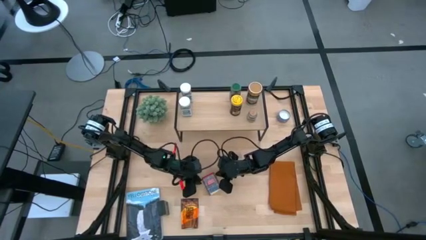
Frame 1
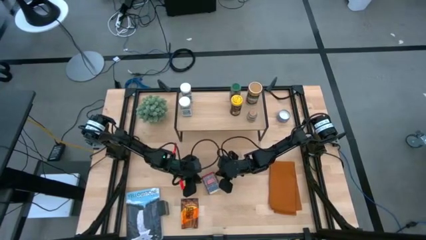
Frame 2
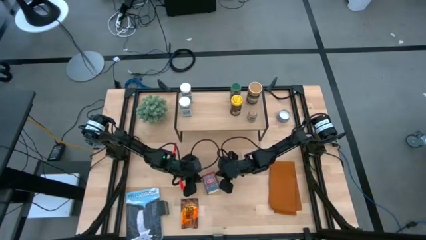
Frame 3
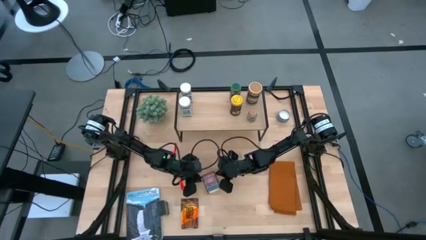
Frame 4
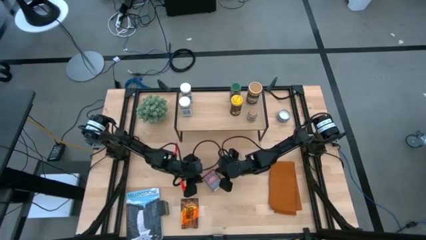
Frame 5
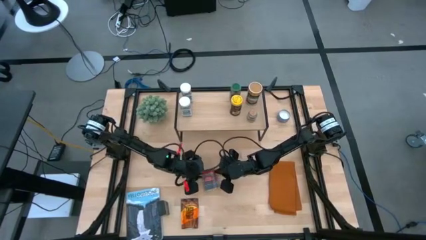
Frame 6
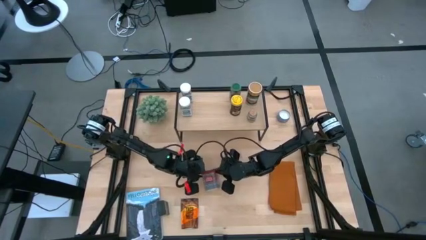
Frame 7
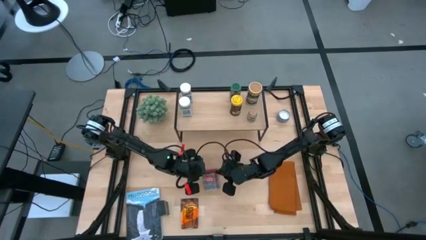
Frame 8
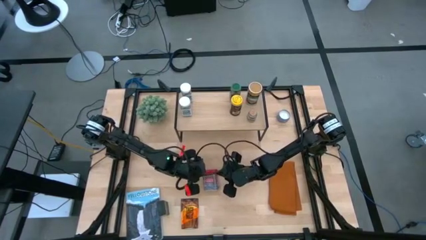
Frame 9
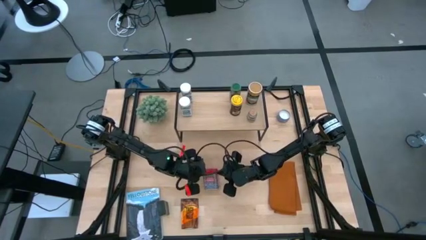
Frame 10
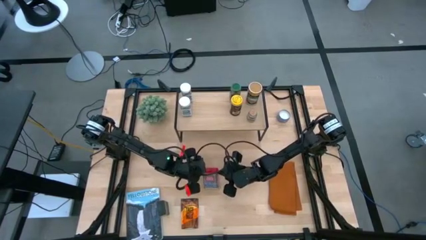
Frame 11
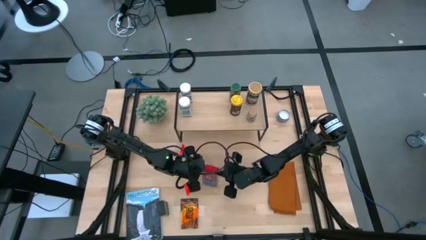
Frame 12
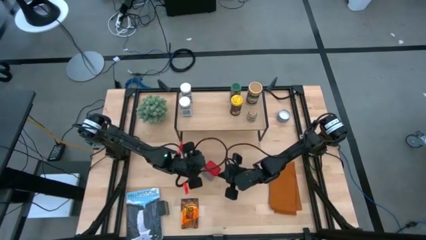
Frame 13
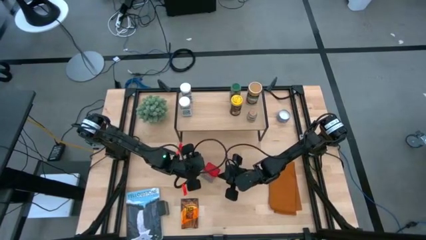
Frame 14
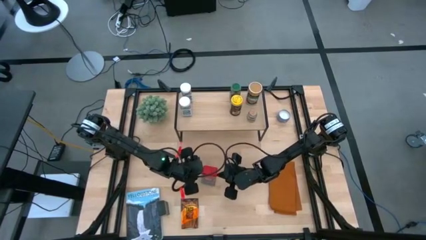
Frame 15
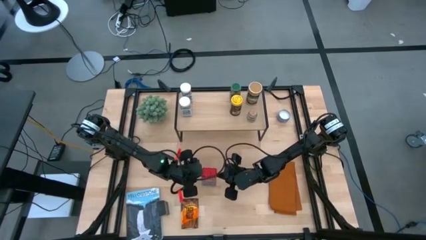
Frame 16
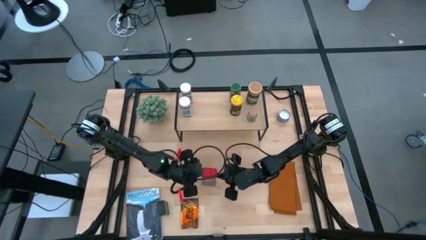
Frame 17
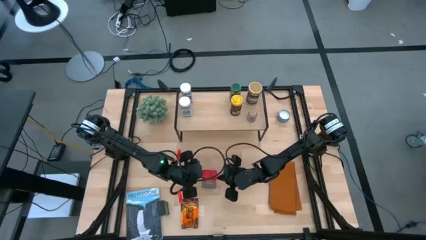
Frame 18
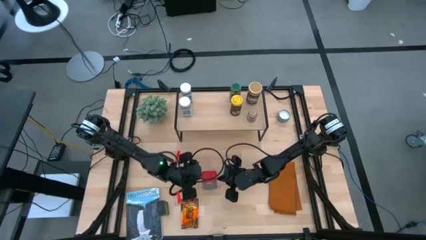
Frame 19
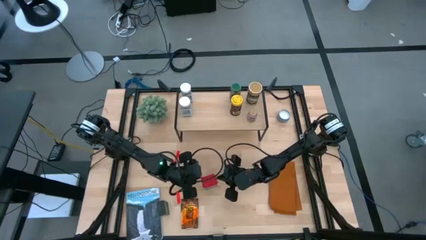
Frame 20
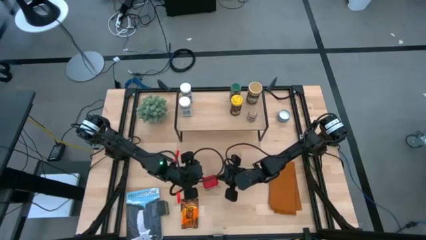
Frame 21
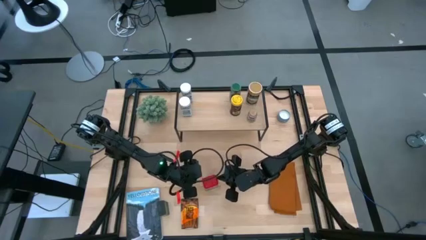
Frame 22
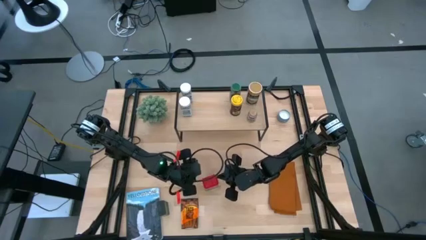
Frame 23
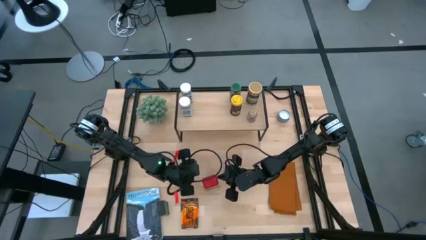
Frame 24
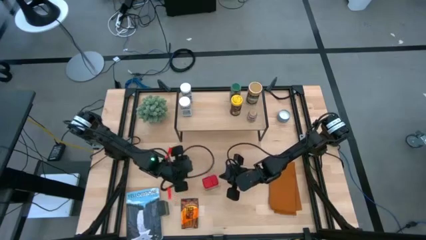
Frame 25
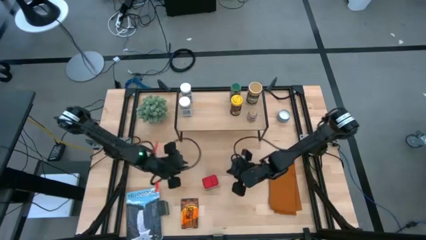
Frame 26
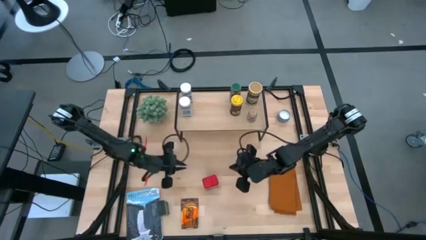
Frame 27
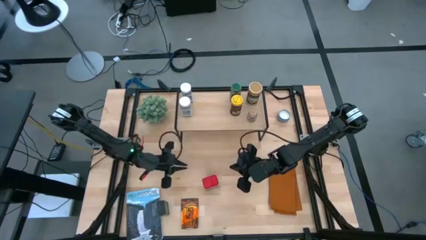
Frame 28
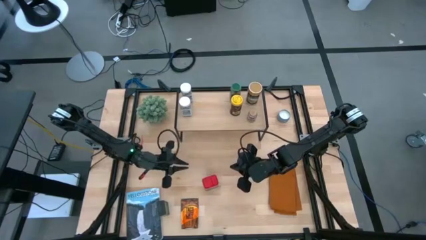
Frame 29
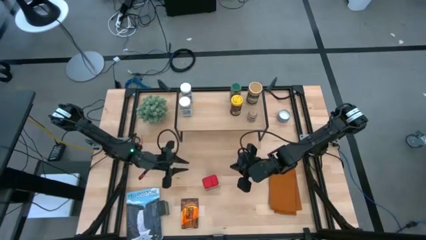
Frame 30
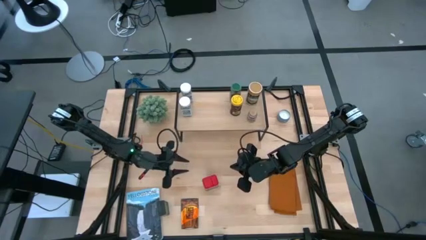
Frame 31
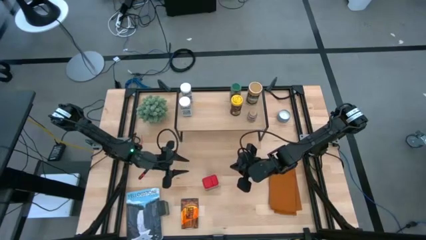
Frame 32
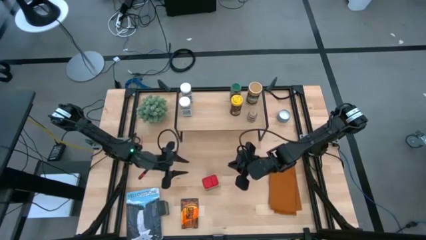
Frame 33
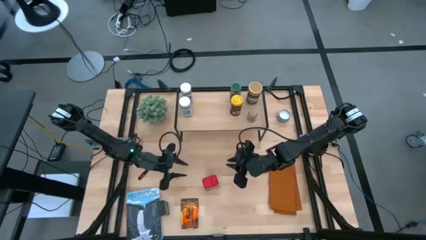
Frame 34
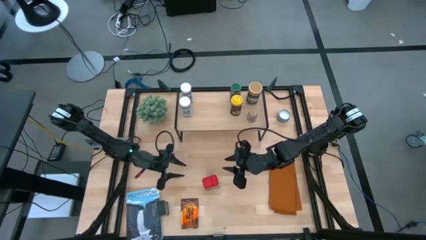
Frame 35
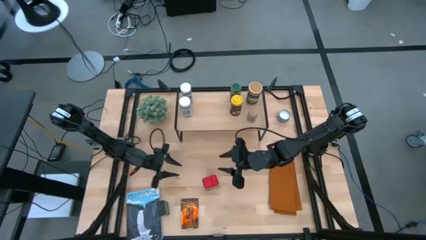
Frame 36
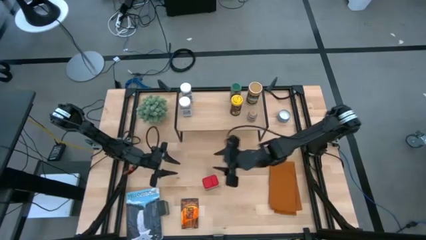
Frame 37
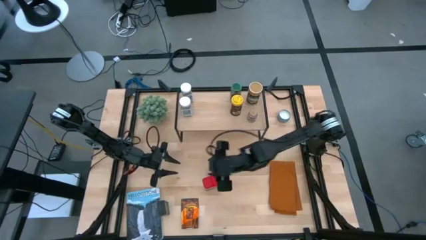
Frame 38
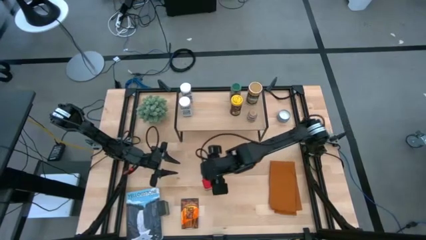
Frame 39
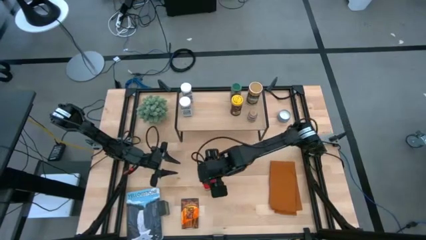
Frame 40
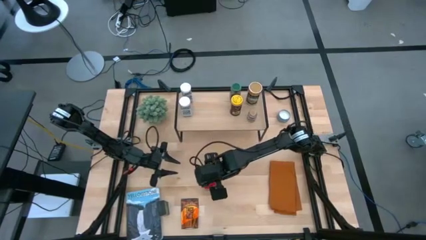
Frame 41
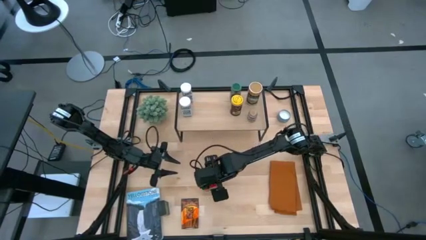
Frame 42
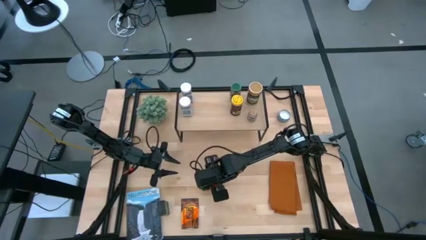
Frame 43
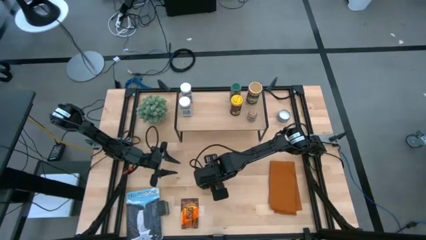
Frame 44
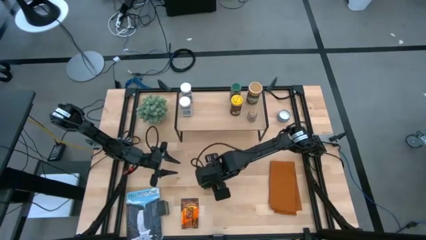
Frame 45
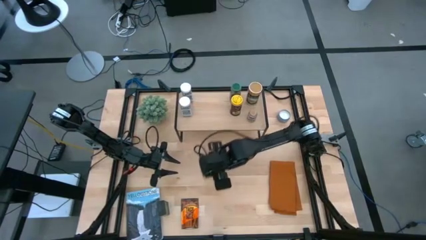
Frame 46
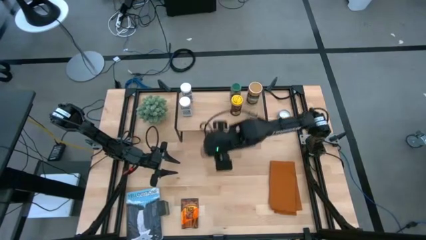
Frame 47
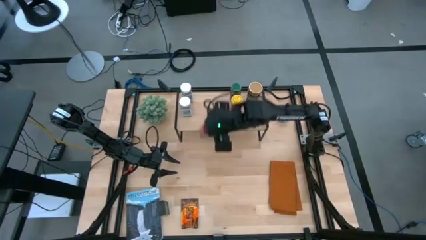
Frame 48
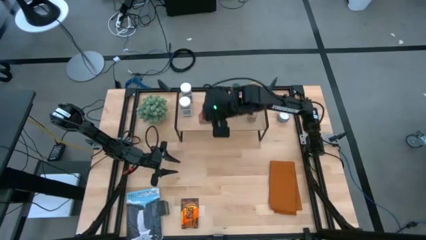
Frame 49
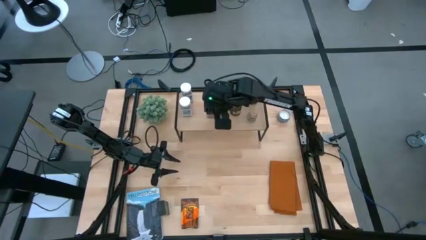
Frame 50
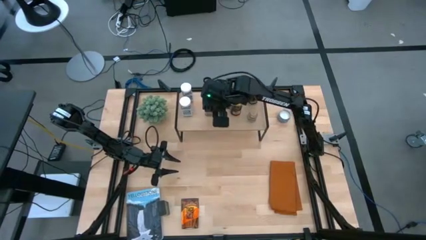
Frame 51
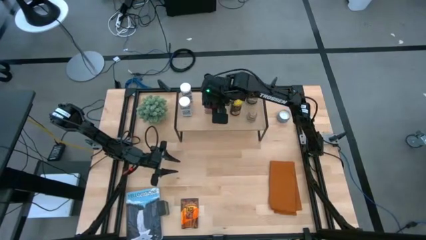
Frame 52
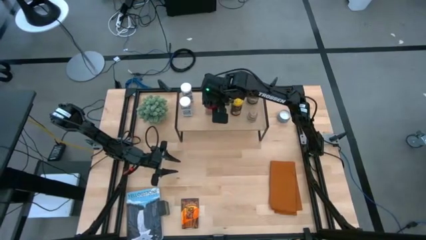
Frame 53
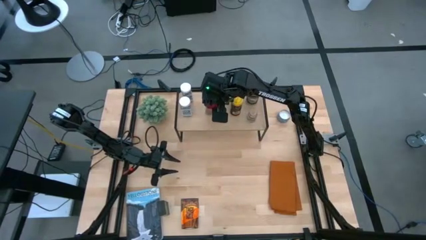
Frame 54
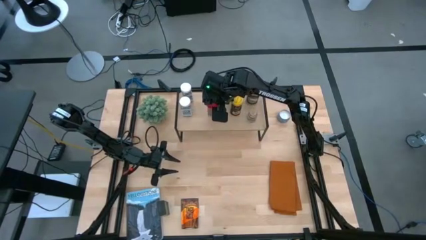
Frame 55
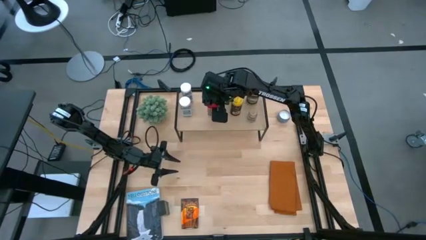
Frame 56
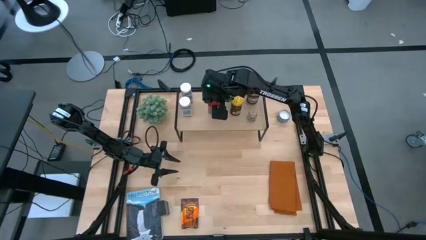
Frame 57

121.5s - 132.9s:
Task: Shelf spices
Put the red seasoning can onto the shelf

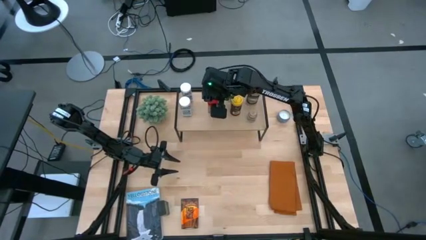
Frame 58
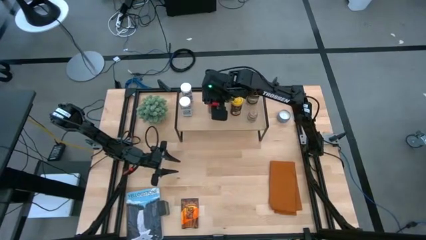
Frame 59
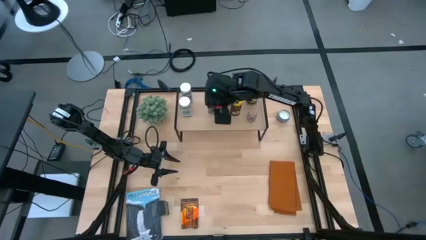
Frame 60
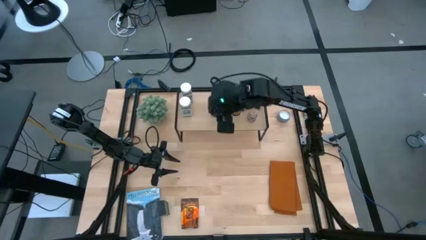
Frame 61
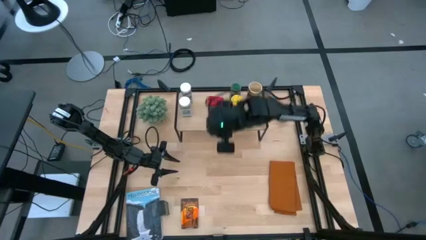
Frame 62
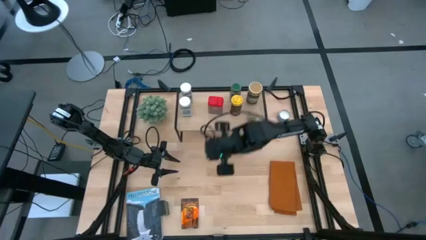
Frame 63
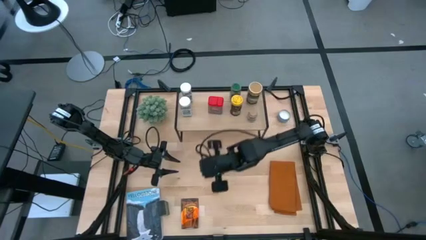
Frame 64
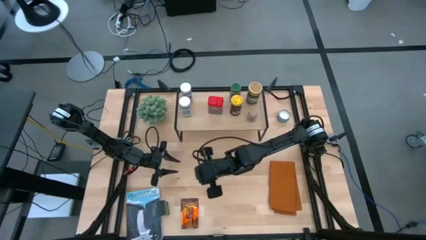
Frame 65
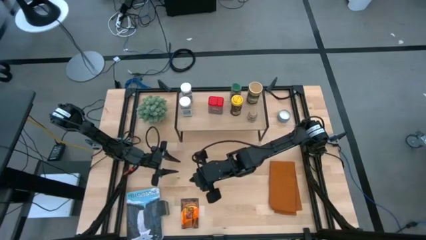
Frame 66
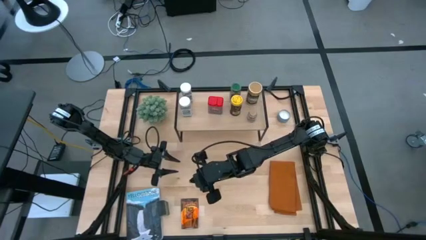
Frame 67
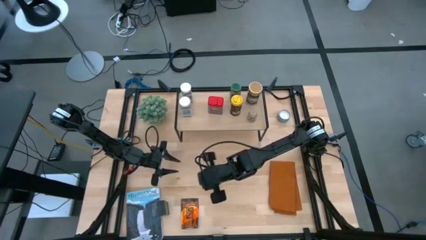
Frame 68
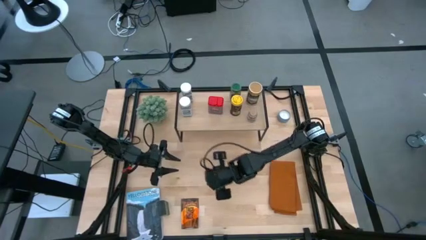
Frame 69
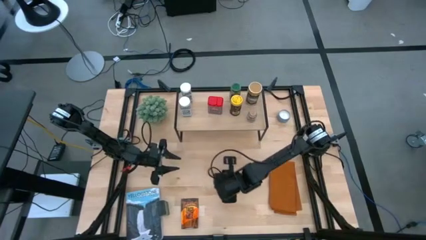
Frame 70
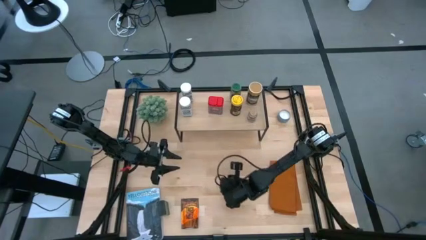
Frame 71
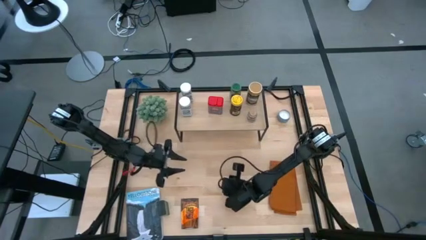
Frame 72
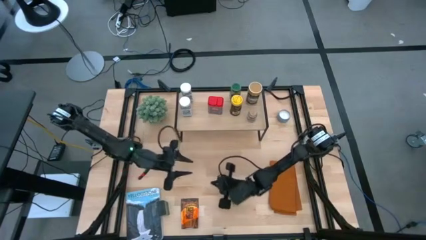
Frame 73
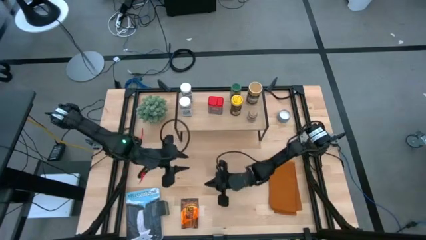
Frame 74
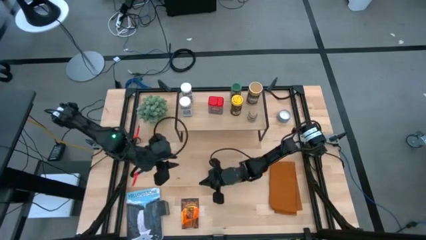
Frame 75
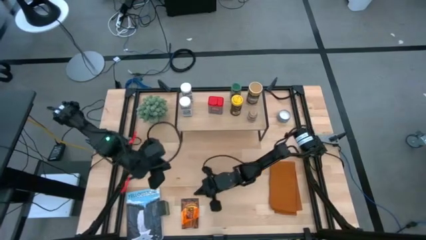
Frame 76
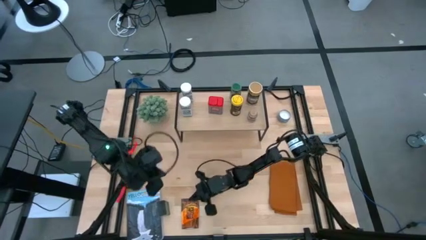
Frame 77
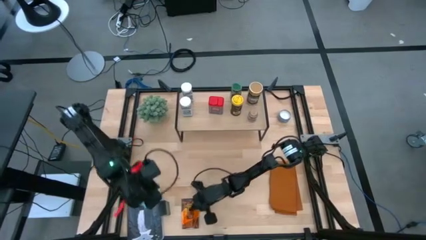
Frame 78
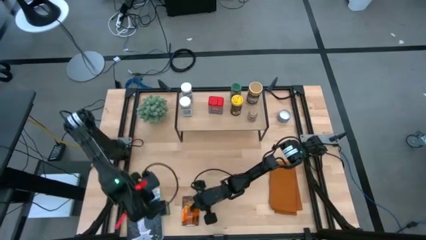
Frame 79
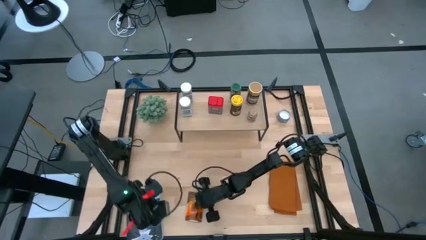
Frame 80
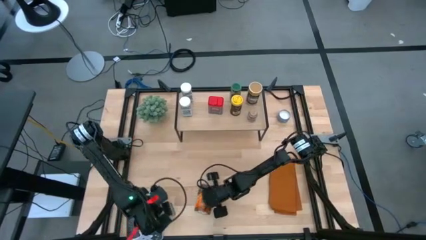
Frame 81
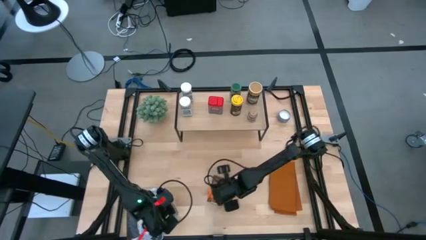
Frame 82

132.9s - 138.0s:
Move the orange seasoning pack to the center of the table
